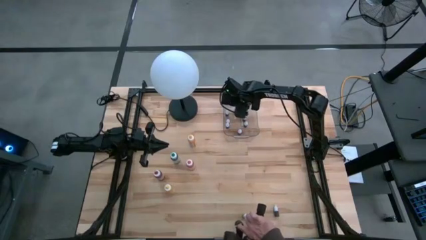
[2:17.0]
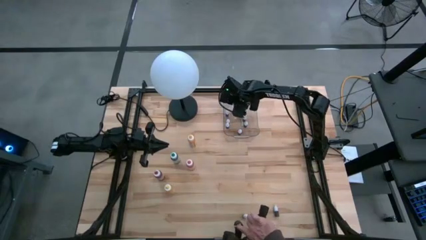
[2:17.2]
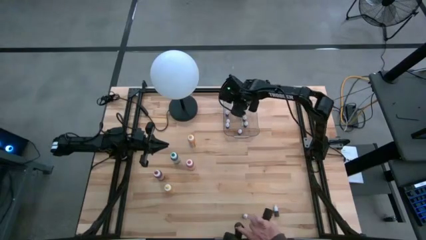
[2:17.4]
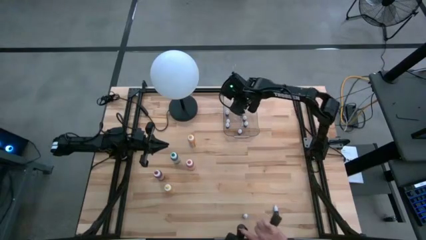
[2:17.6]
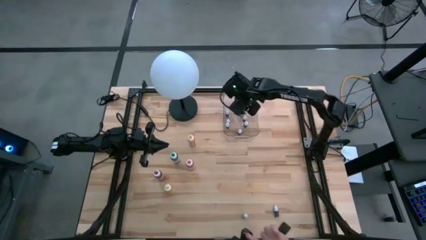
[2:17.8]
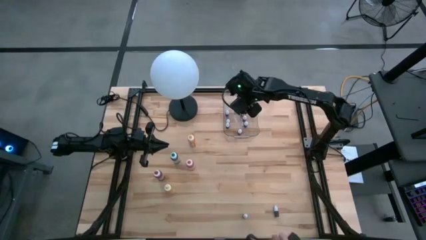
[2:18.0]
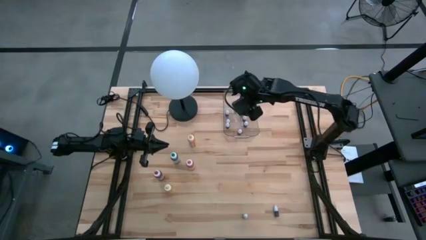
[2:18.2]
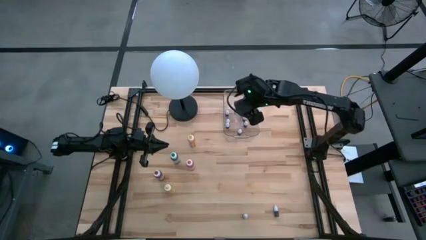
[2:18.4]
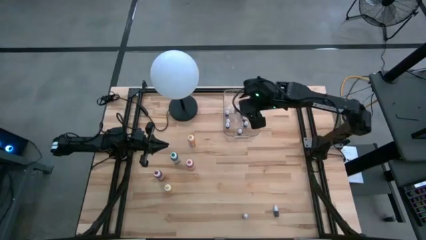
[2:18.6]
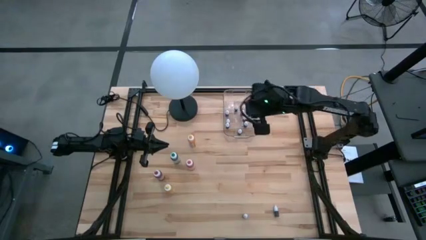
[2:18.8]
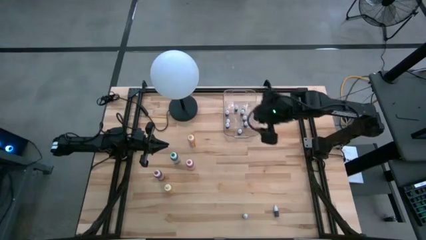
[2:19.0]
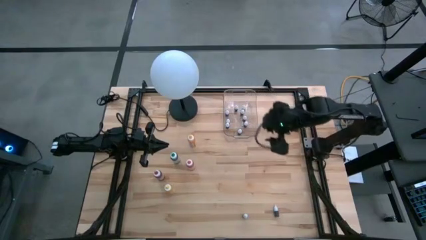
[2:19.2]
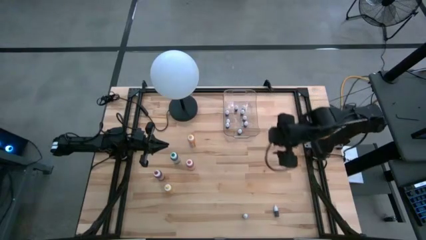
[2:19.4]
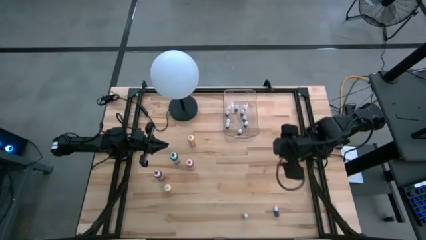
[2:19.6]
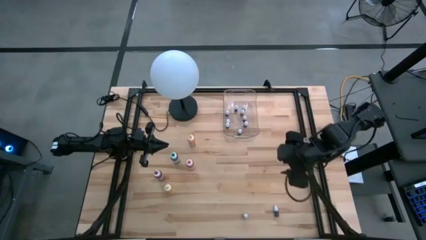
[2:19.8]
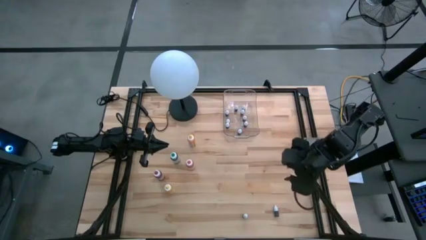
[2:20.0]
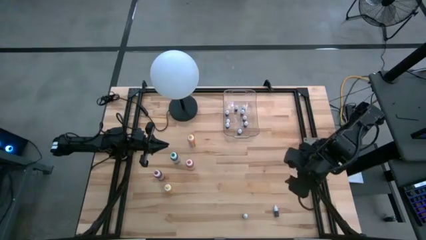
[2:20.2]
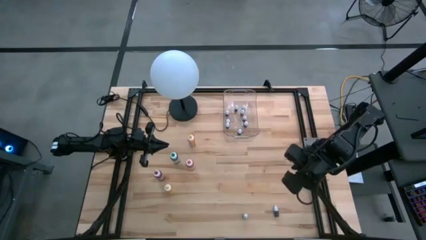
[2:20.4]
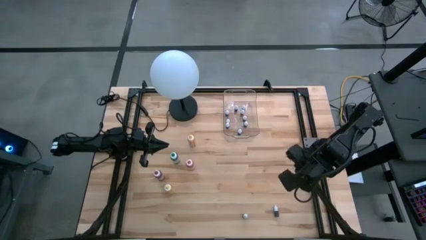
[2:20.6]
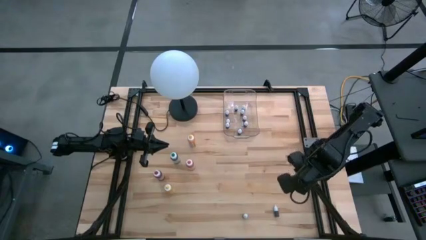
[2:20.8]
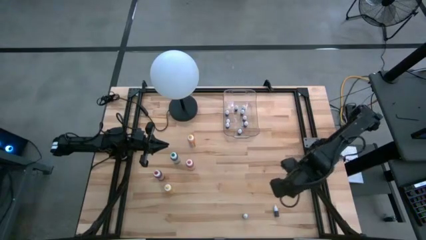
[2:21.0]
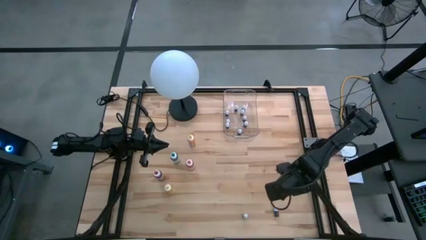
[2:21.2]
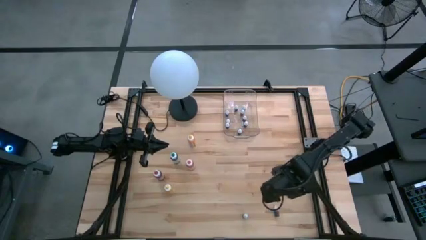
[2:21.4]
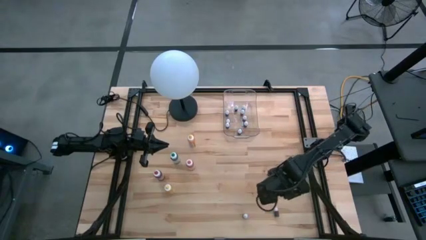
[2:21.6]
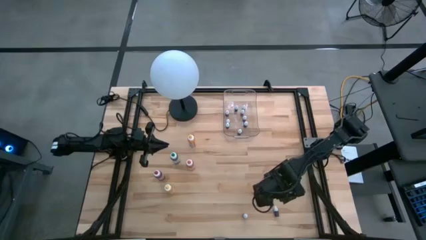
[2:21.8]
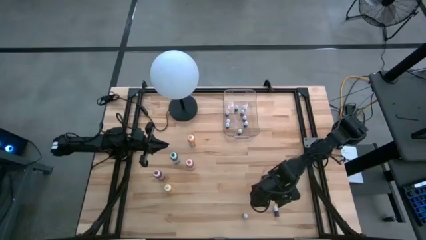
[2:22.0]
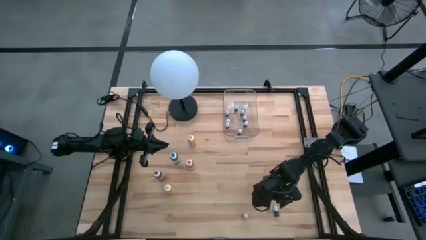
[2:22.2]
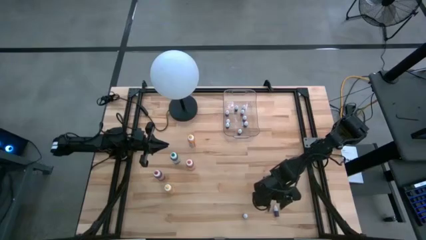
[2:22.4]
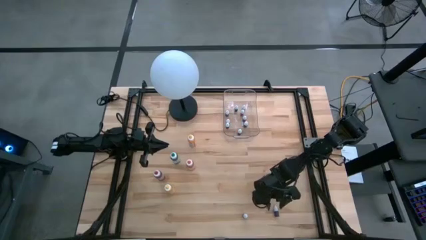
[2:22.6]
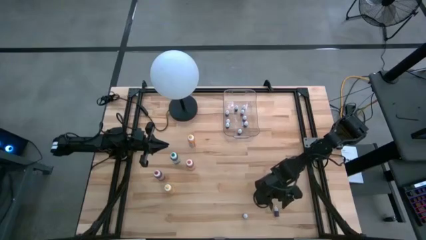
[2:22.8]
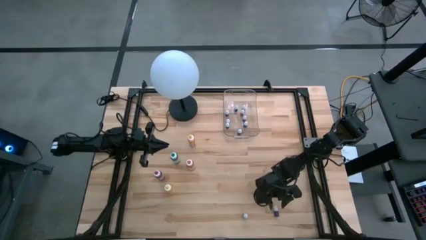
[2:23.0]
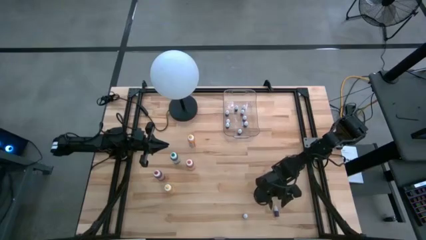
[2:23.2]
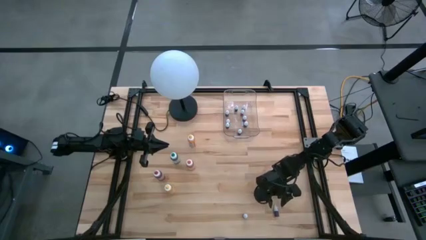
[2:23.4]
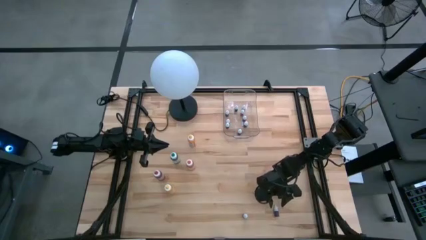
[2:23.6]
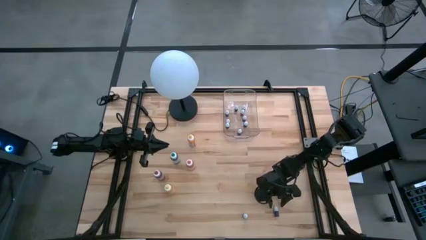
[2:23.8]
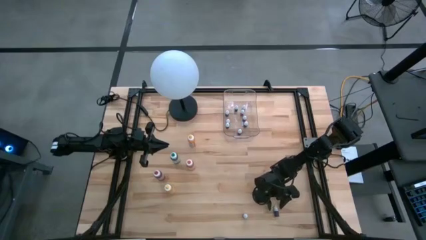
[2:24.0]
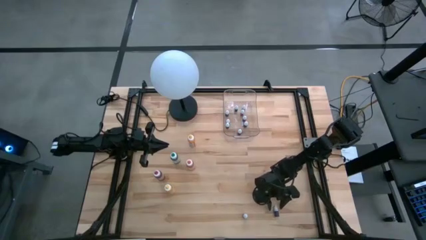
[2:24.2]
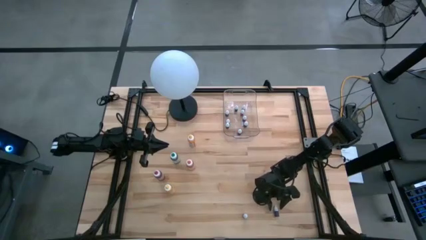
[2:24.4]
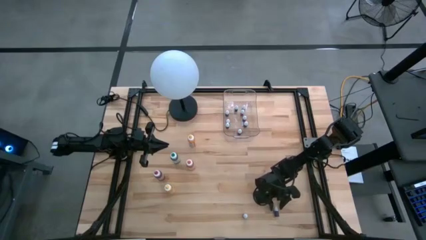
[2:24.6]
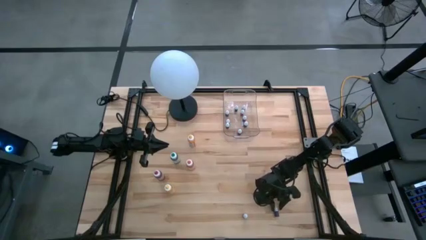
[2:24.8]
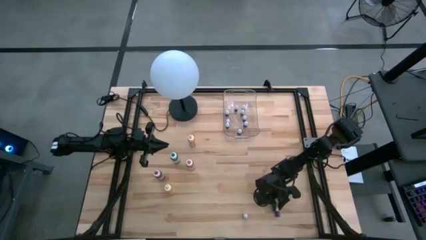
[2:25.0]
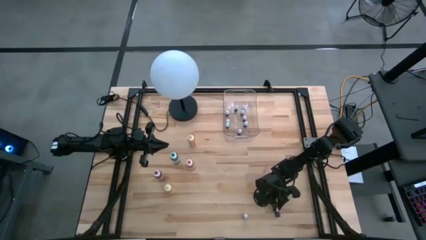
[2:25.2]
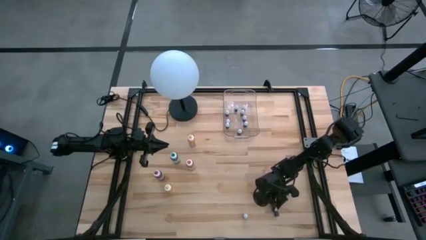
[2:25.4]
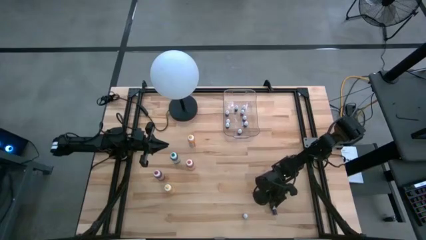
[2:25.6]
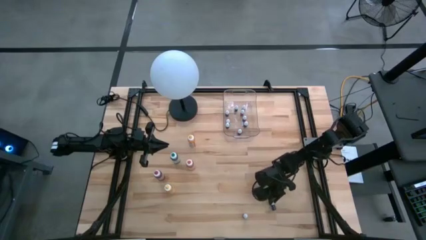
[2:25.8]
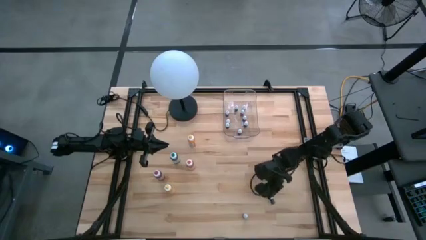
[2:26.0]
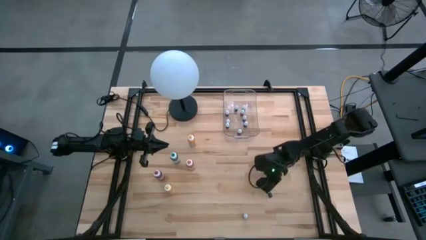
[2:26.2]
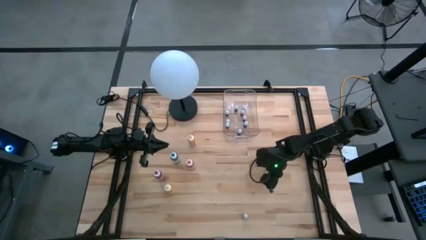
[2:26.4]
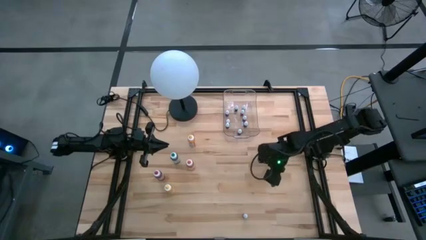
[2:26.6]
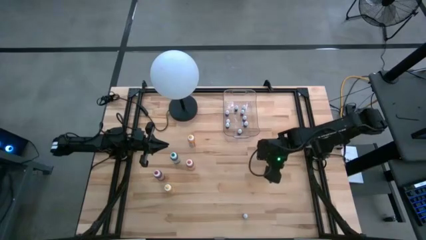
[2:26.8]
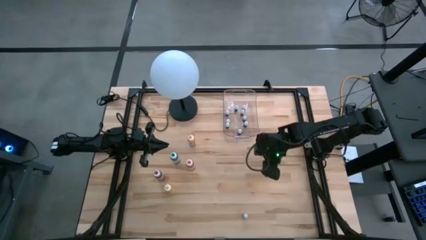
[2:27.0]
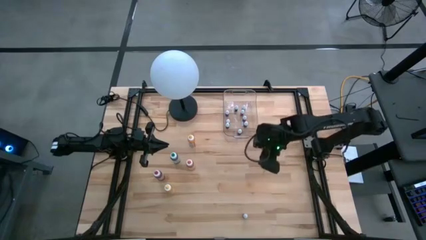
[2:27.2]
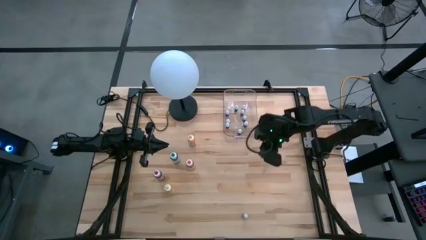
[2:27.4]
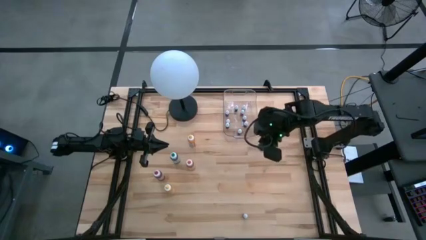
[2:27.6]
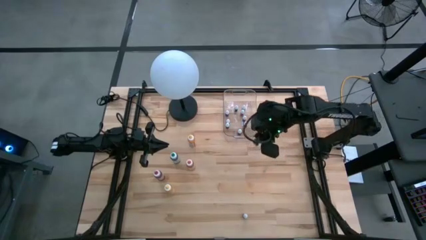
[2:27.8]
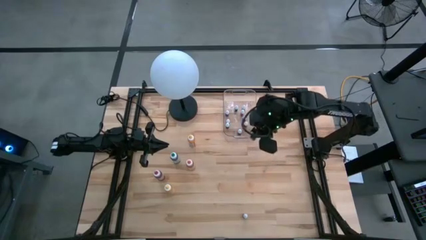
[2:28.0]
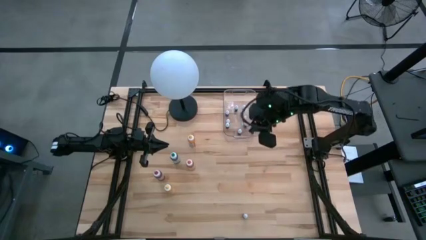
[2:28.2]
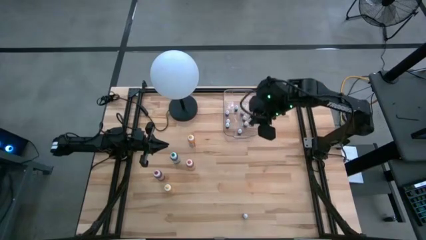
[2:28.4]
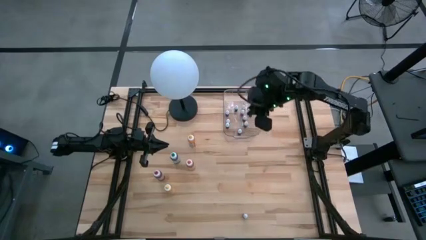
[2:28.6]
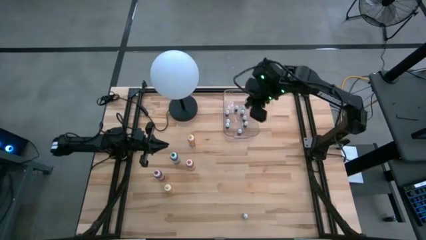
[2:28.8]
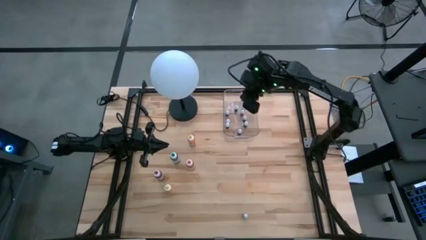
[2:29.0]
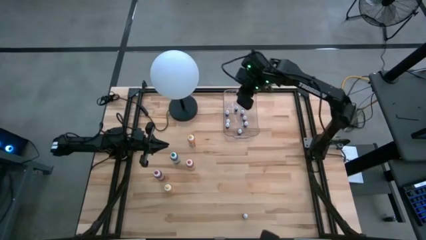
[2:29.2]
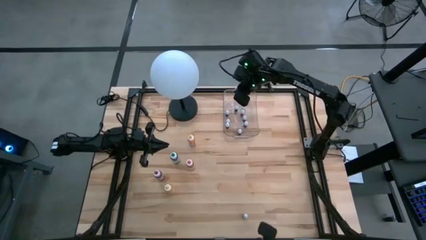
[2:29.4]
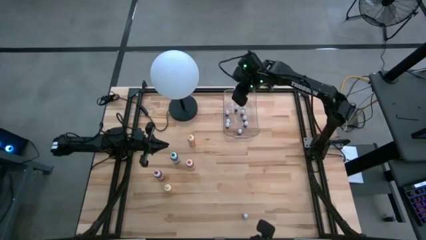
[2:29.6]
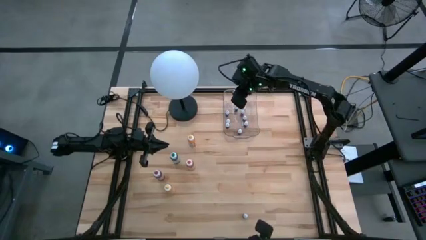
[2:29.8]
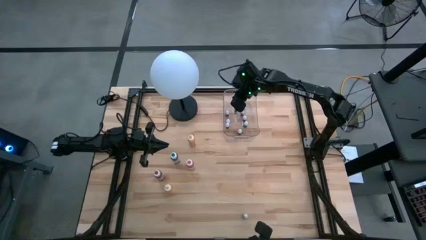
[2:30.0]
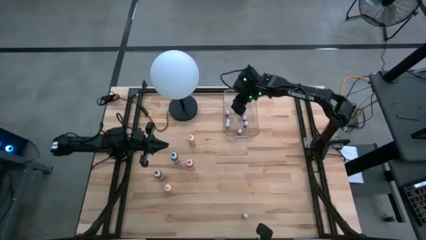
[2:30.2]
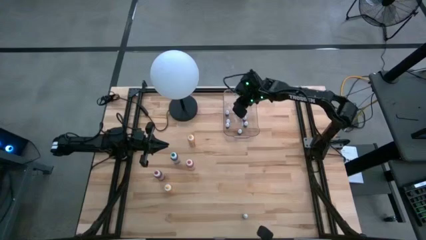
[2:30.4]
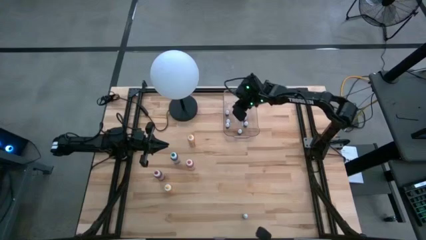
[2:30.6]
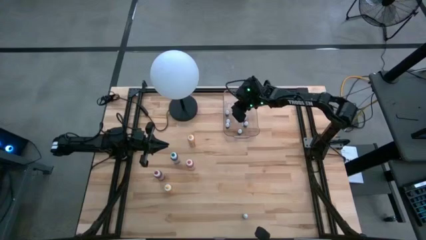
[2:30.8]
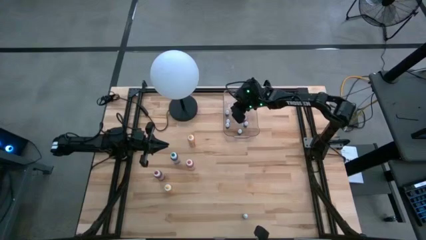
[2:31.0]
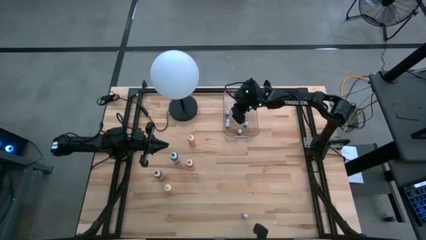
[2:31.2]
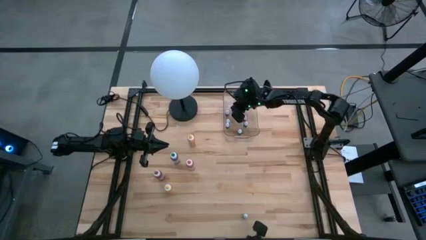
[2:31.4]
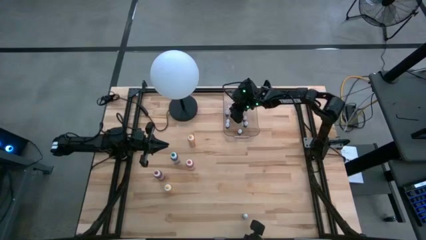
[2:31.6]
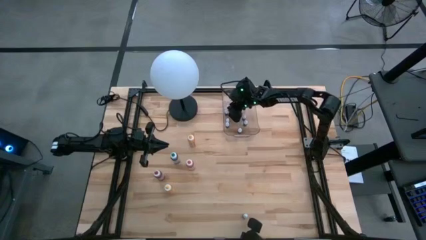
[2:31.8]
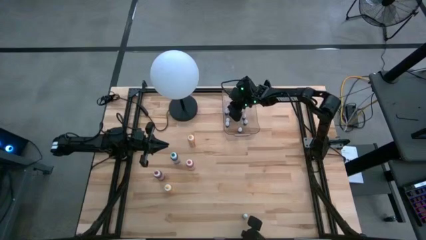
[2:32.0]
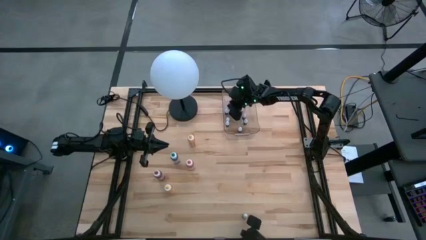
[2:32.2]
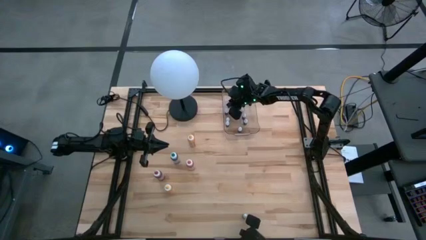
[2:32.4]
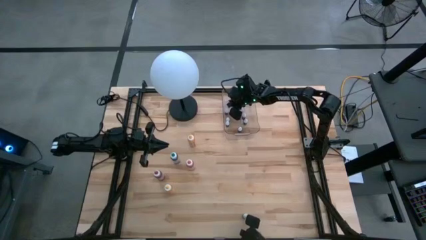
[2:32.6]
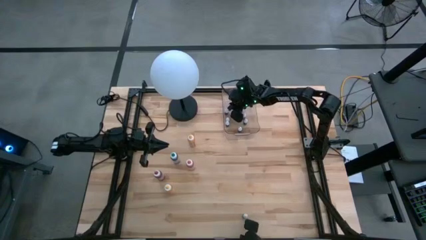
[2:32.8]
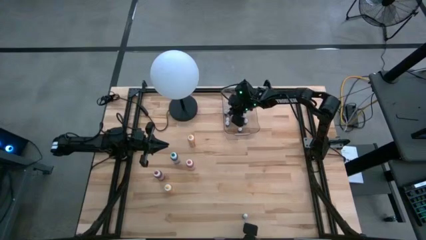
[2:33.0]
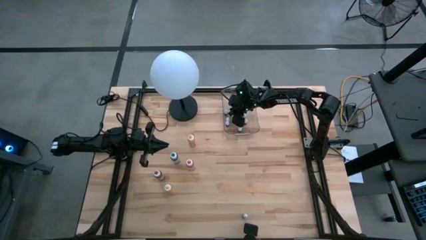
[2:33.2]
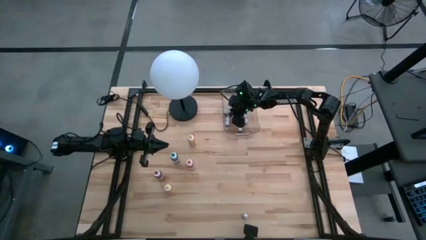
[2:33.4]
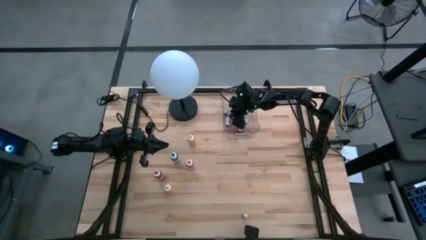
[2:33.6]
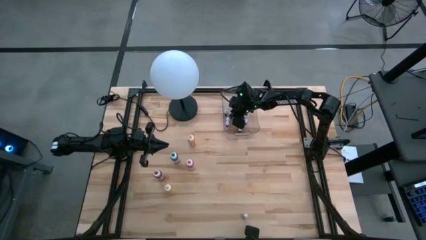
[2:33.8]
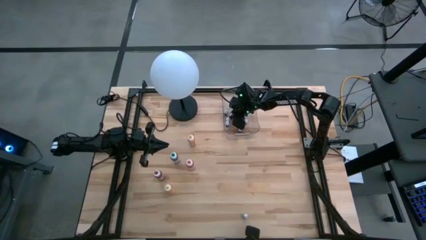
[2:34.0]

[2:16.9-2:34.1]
Task: Pick & Place food coloring
Put the small red food coloring bottle into the transparent bin
